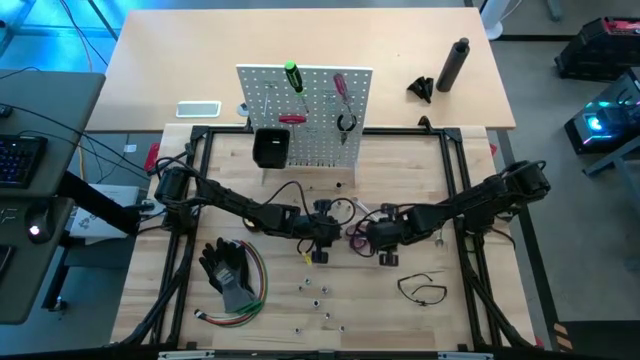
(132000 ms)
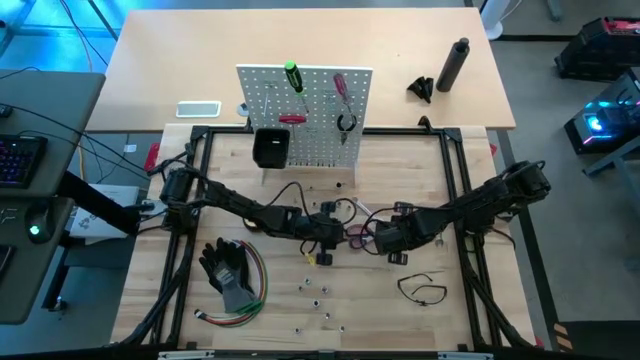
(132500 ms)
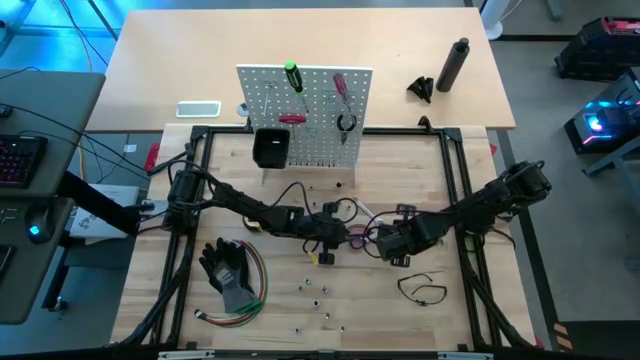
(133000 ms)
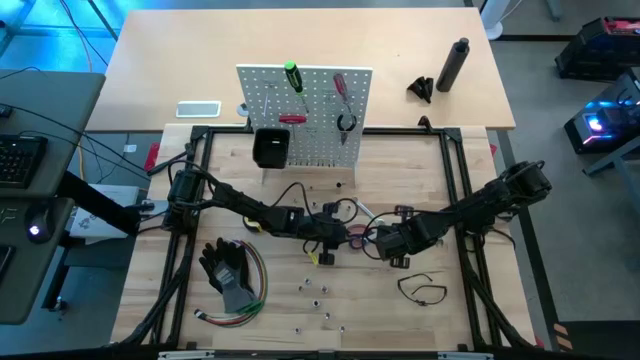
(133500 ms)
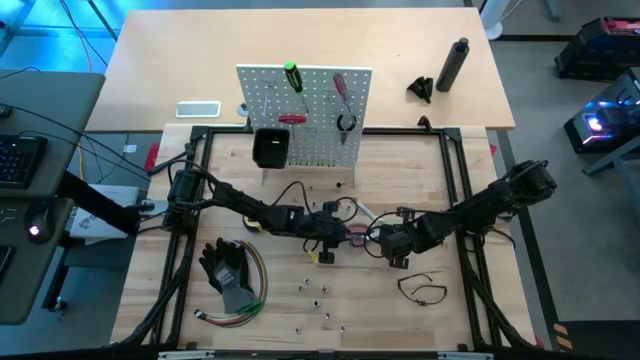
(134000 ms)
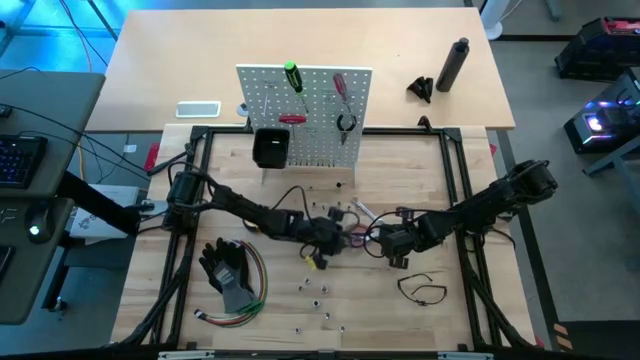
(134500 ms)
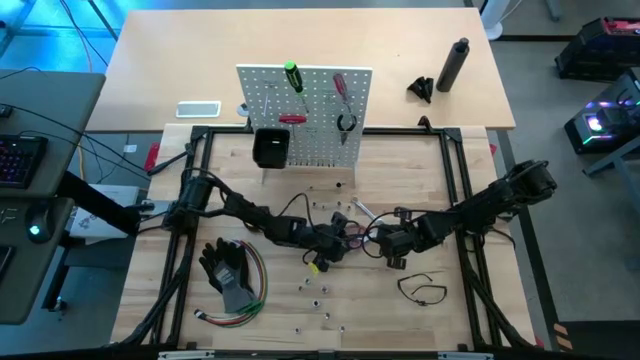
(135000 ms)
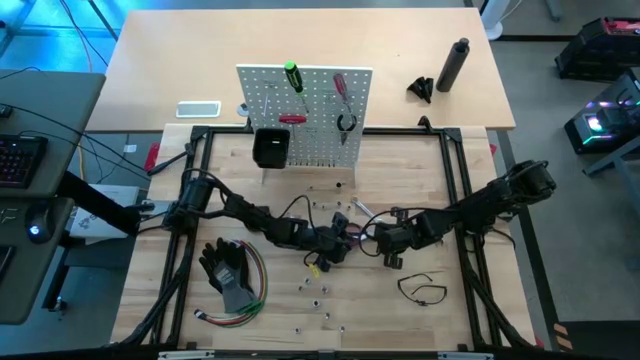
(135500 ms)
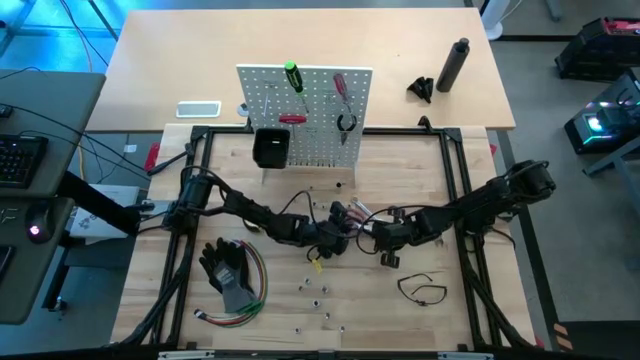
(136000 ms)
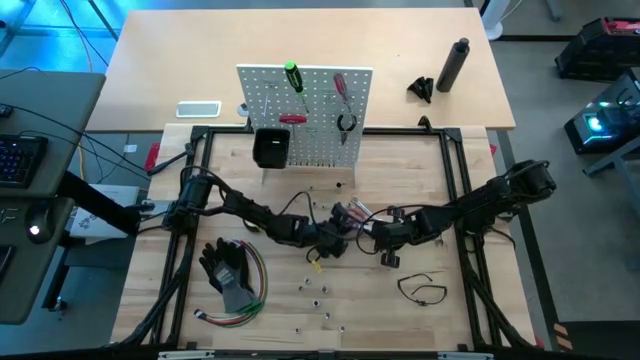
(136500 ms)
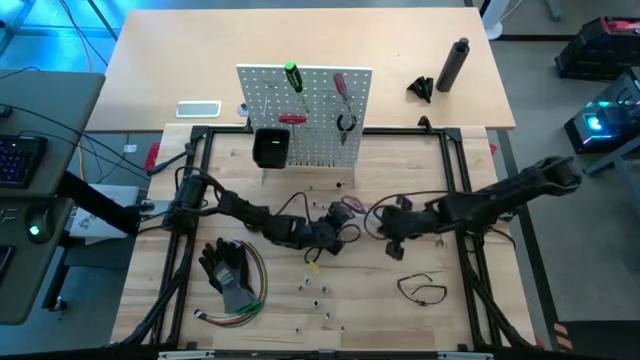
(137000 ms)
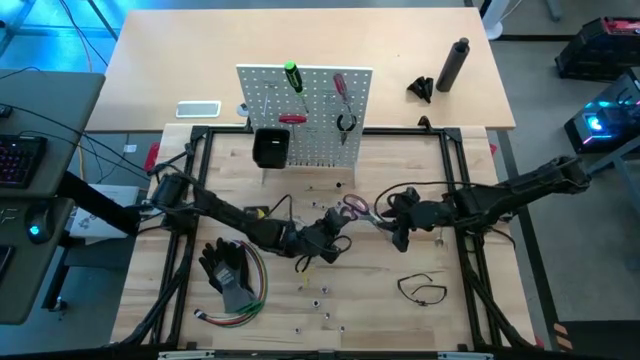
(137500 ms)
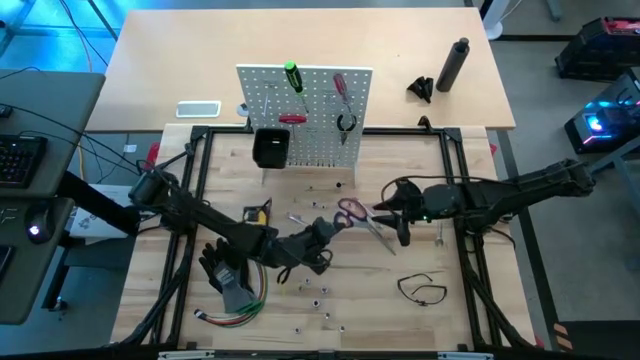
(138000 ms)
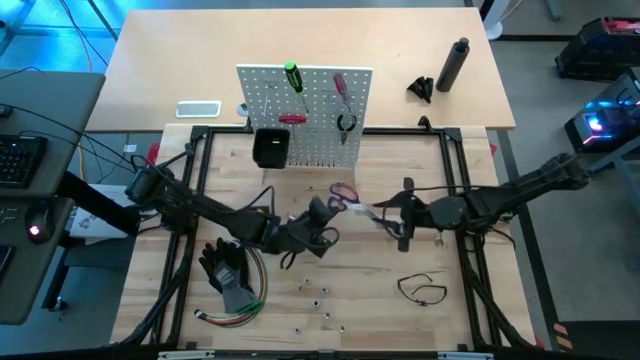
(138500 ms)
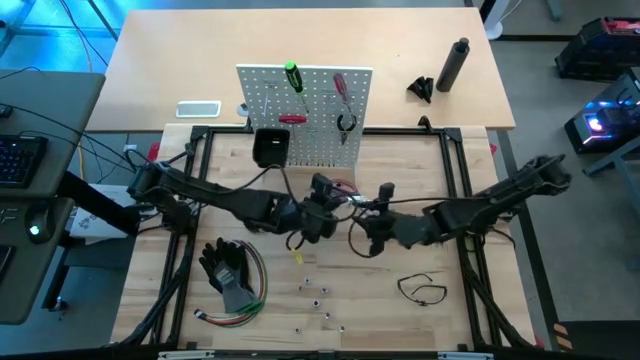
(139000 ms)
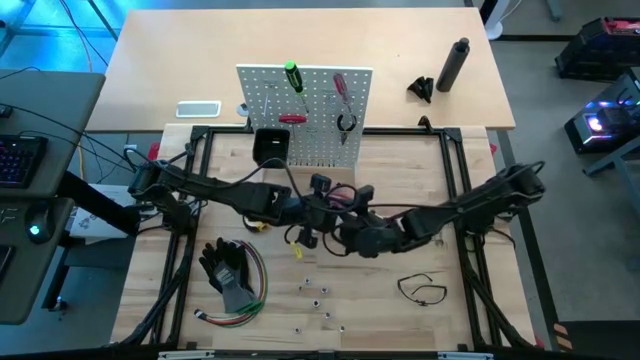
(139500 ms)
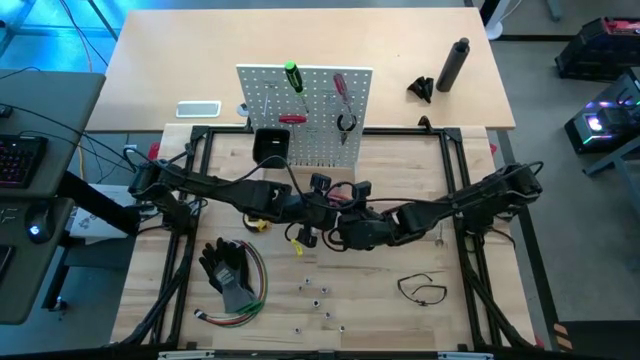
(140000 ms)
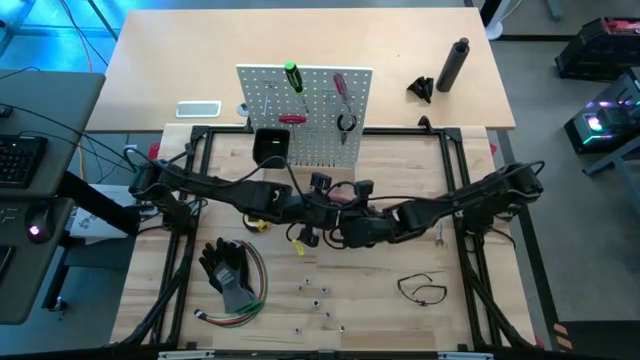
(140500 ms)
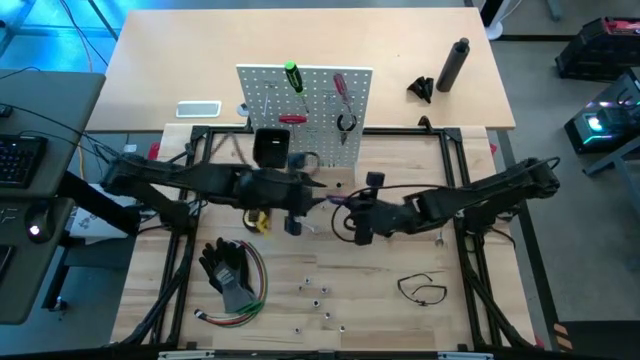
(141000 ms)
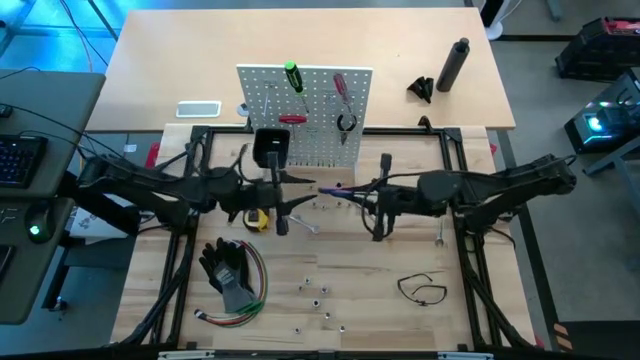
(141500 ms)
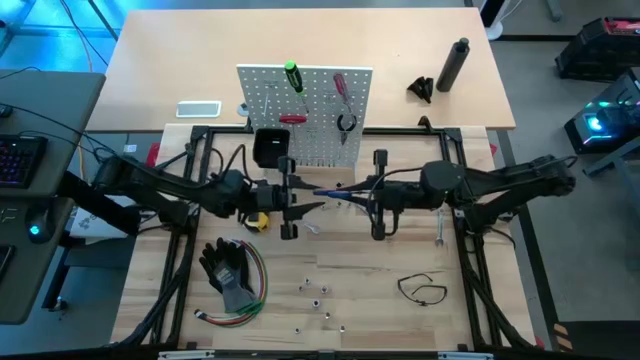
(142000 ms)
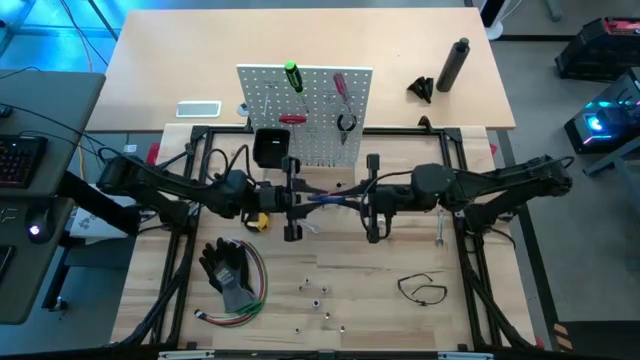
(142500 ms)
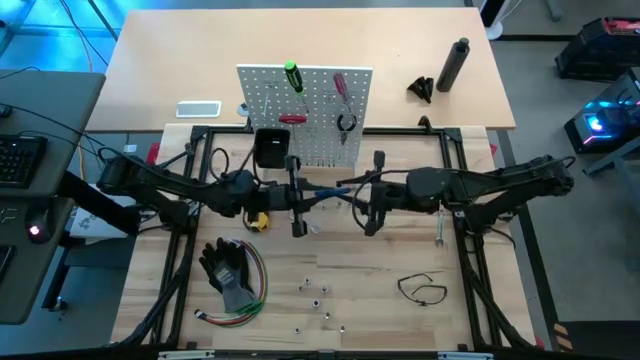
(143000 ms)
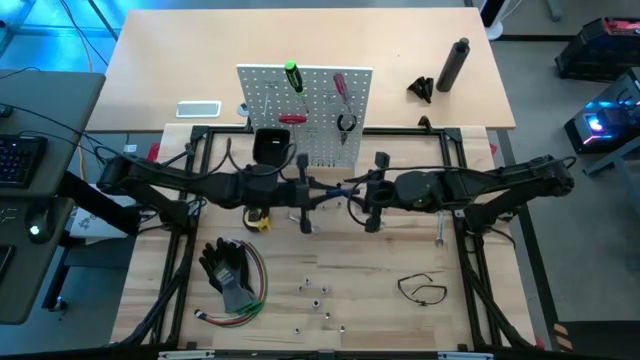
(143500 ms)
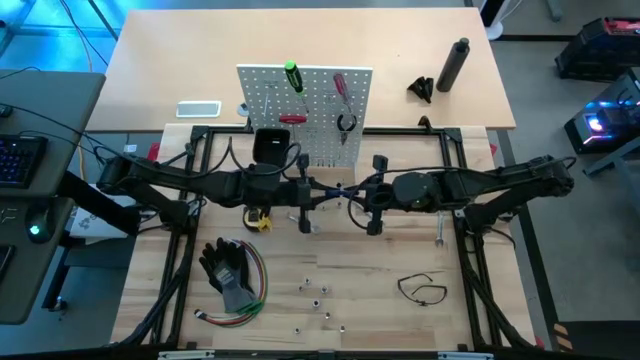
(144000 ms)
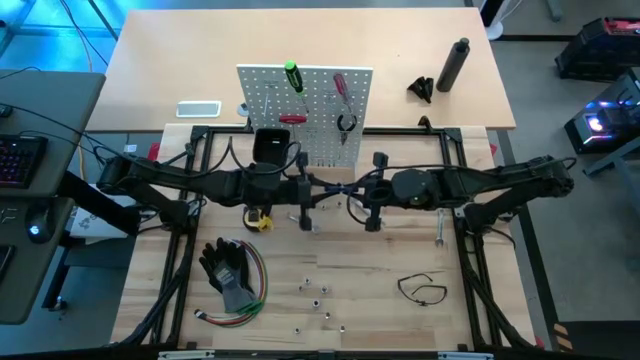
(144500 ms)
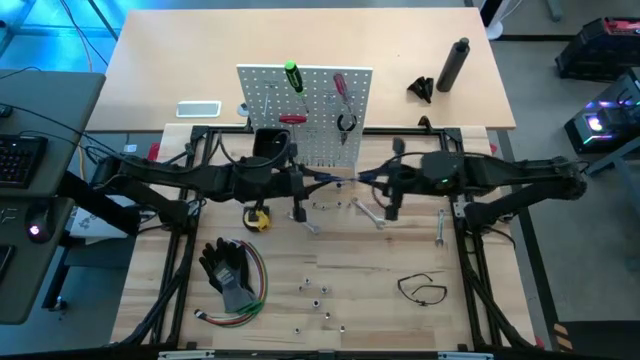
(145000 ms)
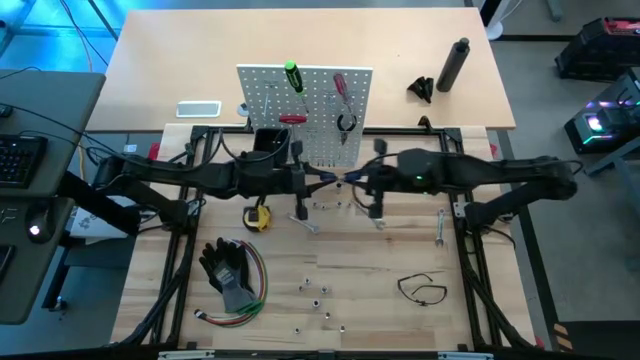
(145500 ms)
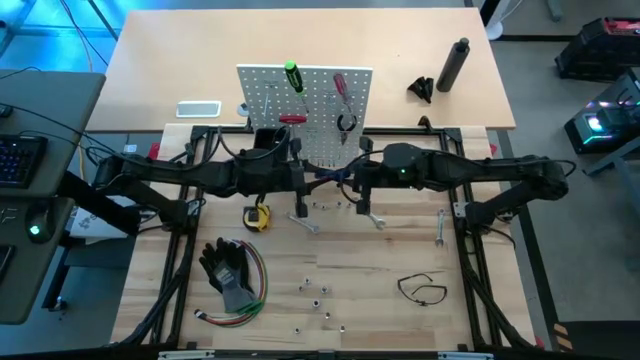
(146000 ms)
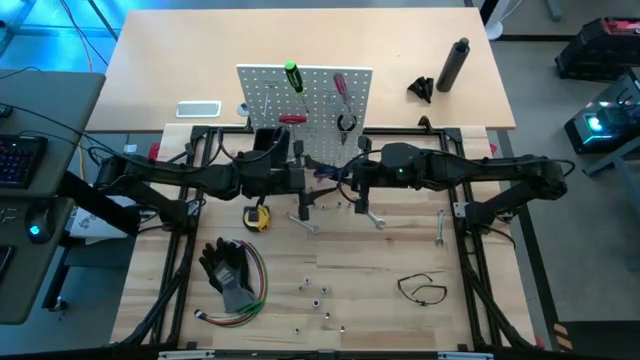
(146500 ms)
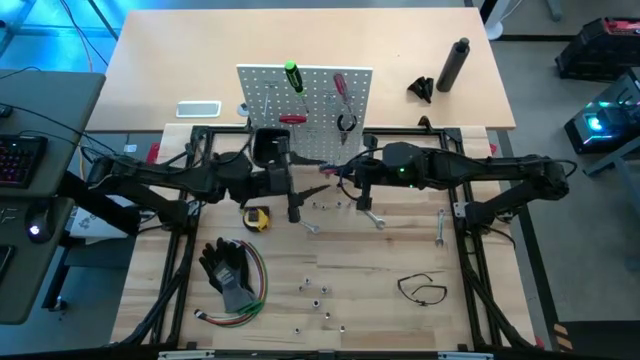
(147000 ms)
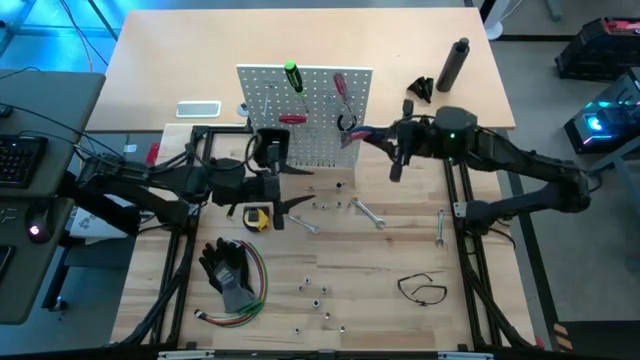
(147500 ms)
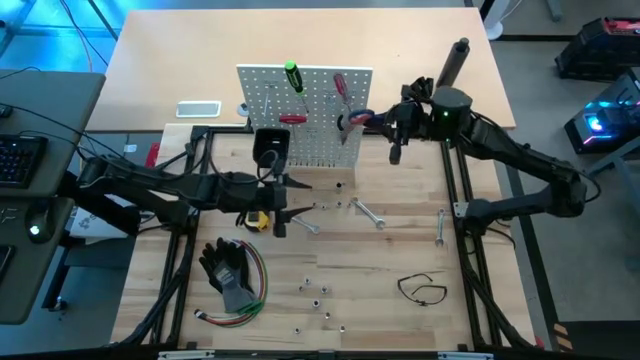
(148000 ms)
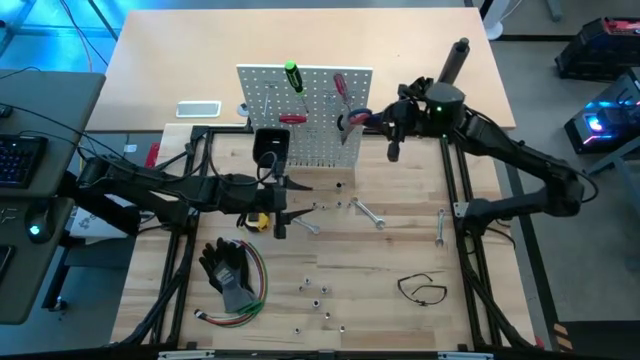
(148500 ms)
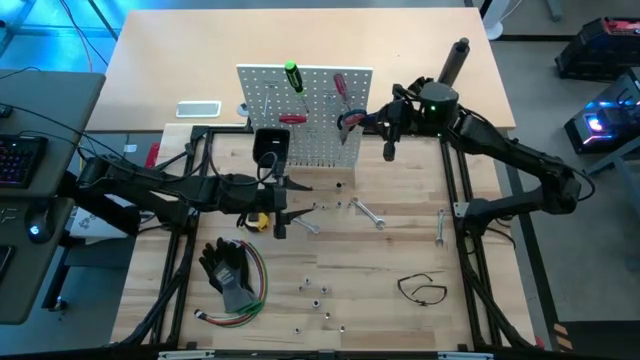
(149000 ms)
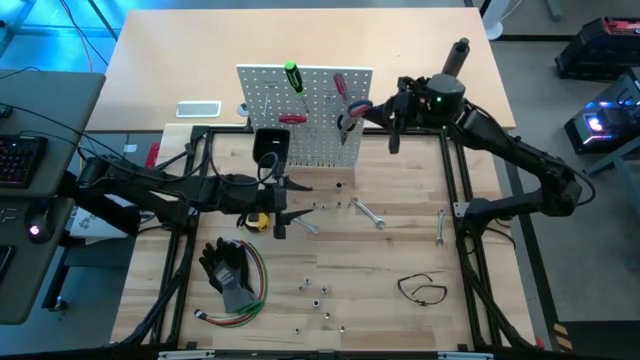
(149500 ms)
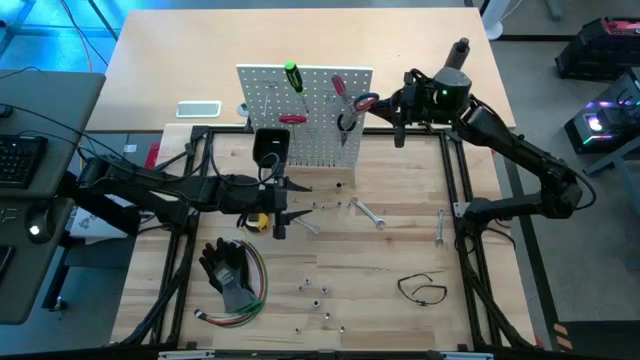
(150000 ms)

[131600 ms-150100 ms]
Task: Hang tools onto peg board
Hang the blue scissors on the white peg board

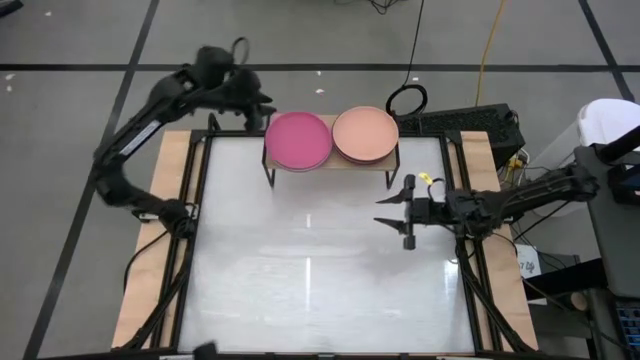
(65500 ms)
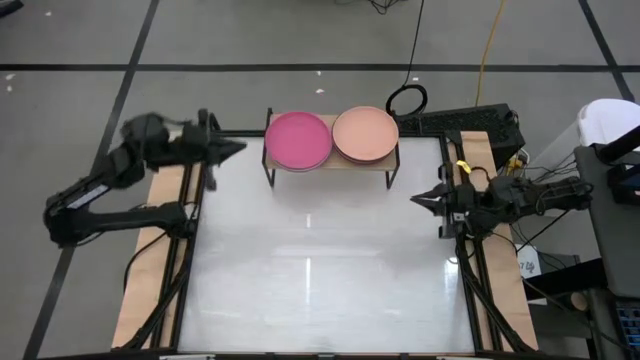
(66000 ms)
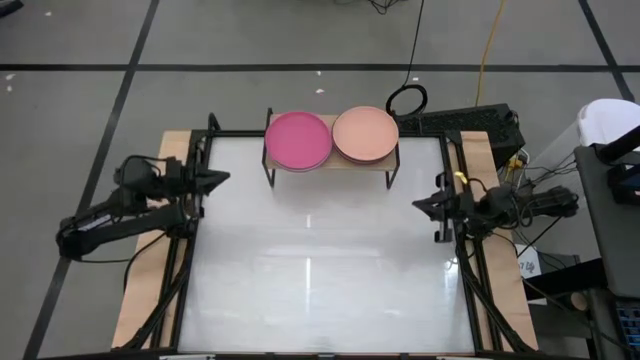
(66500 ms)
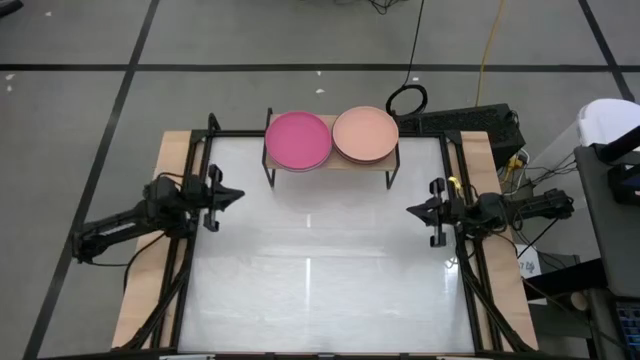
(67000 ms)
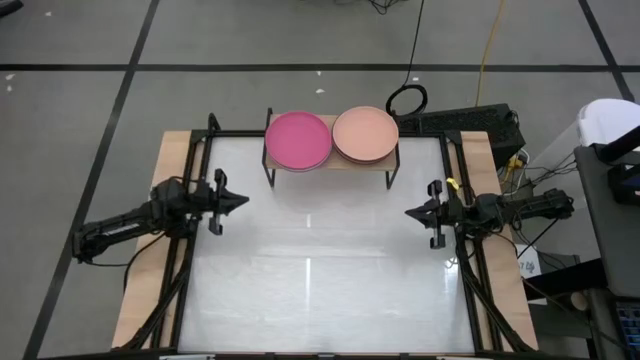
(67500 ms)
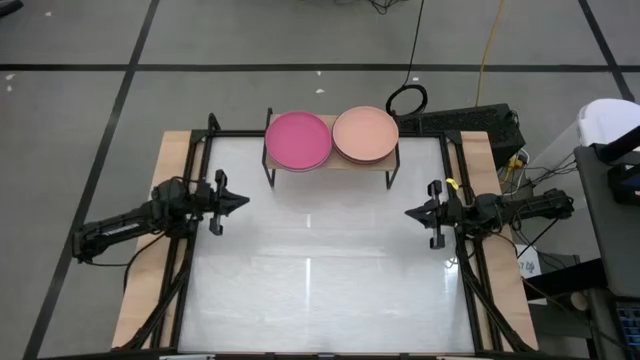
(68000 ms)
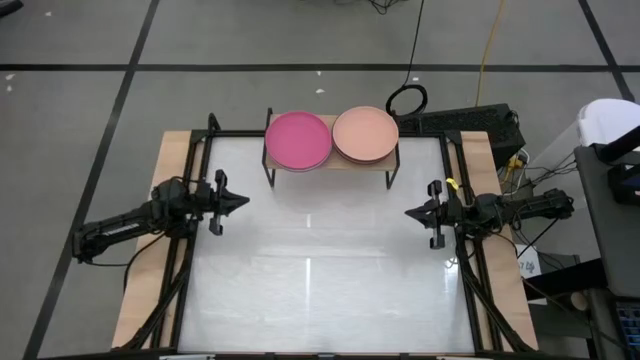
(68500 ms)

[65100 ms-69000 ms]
Task: Place and stack plates onto a shelf
Return to Home Position
